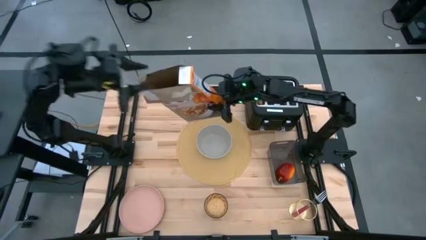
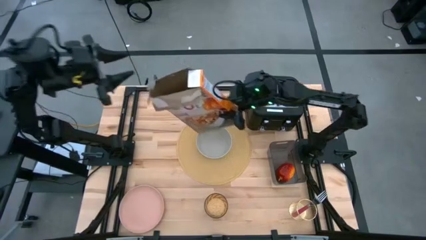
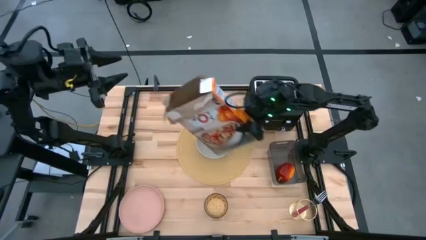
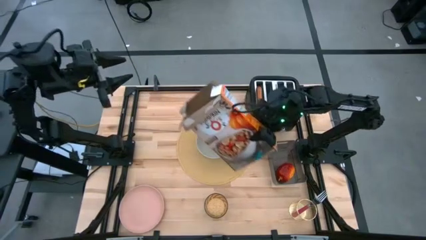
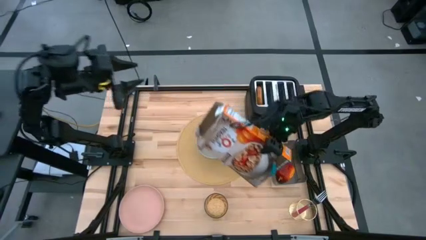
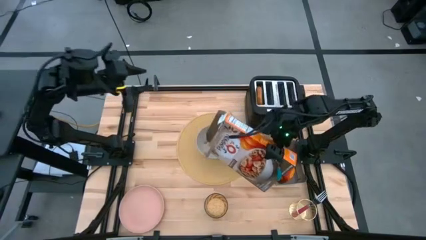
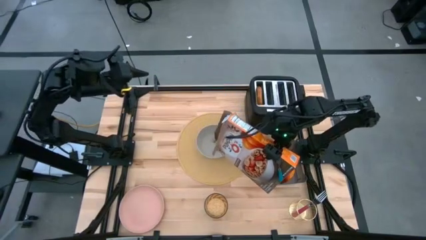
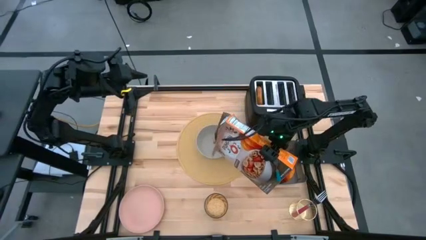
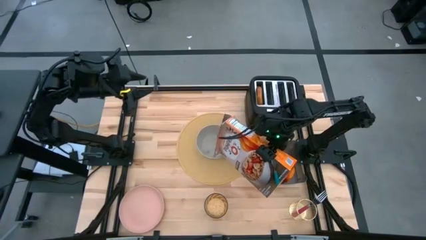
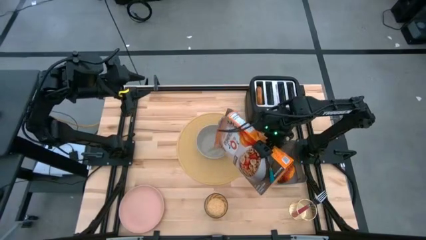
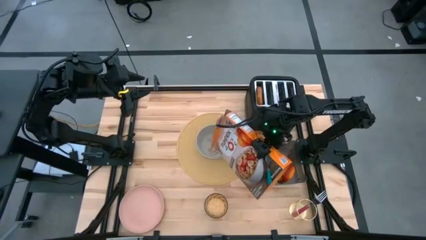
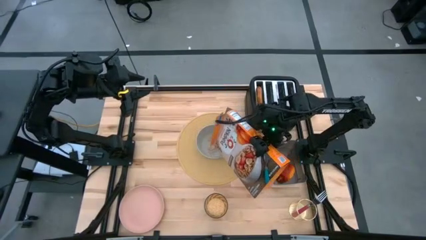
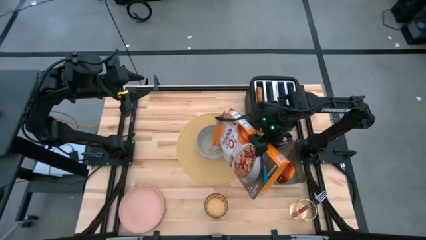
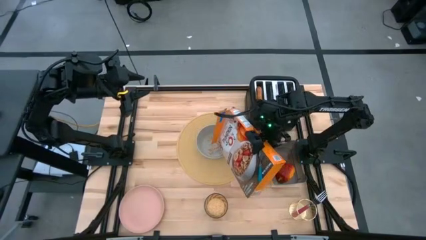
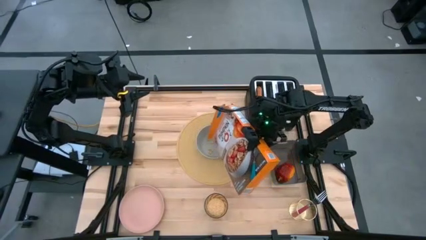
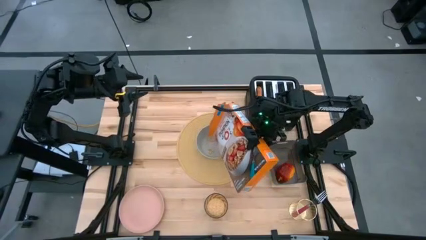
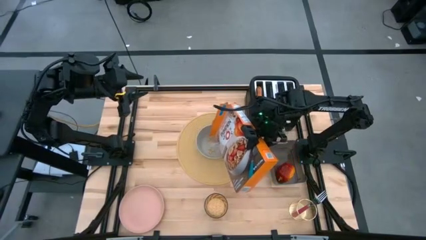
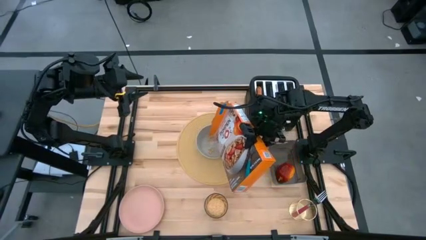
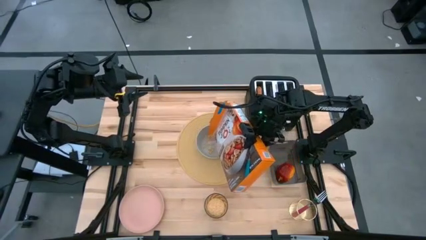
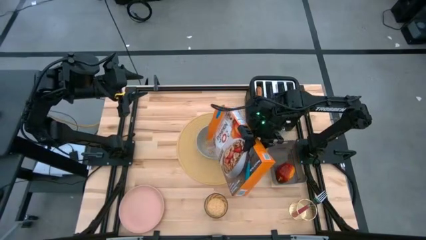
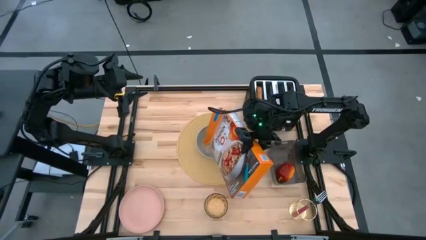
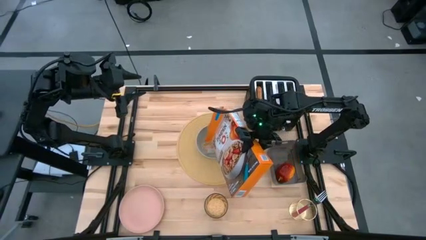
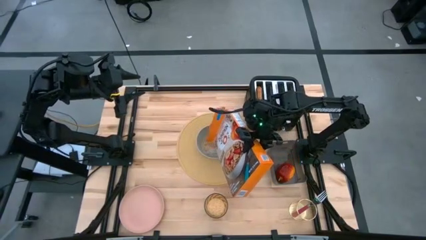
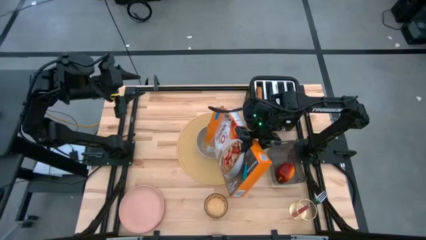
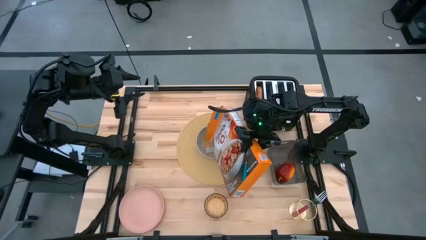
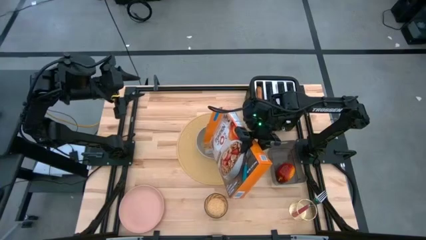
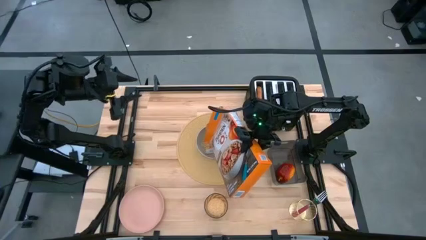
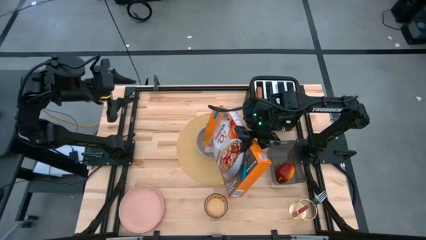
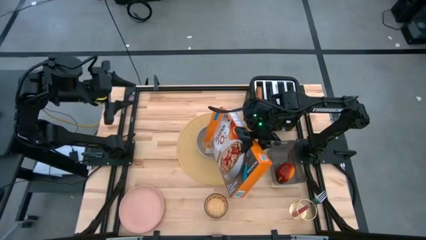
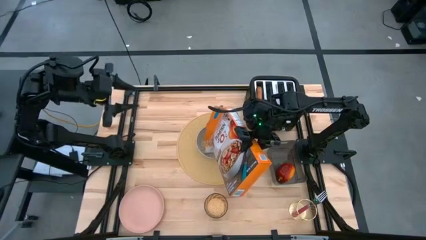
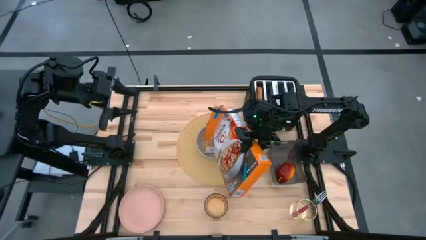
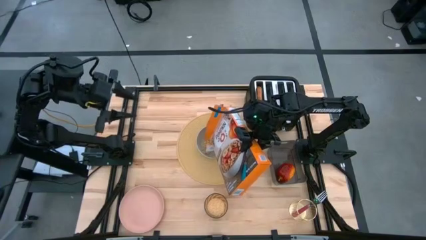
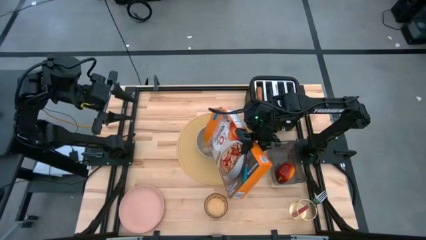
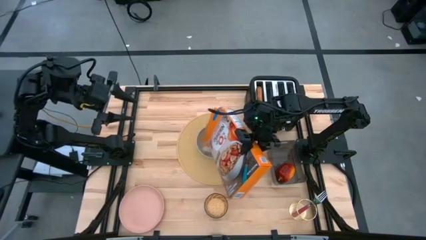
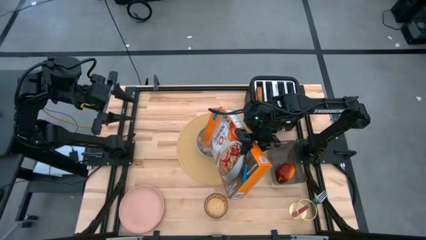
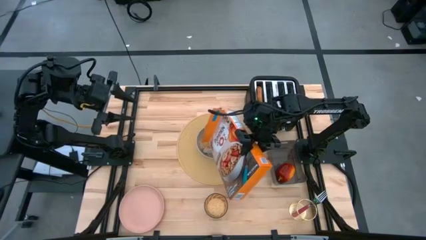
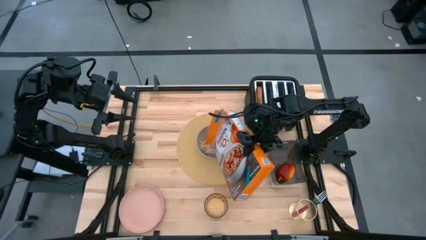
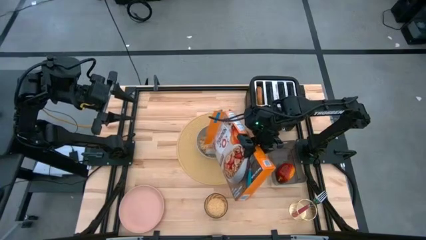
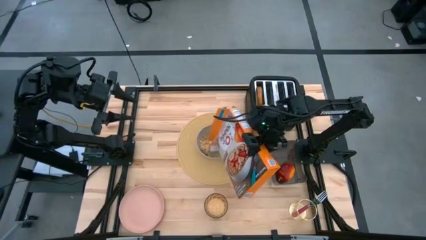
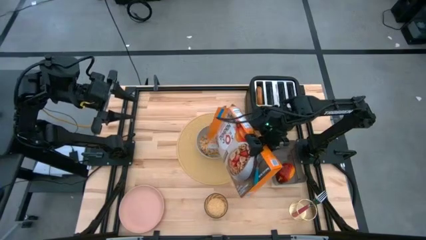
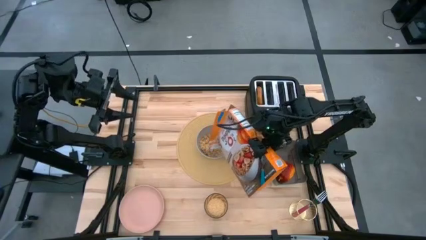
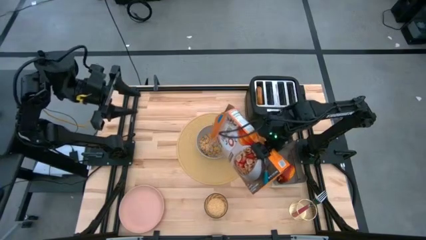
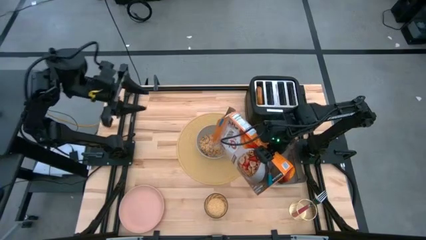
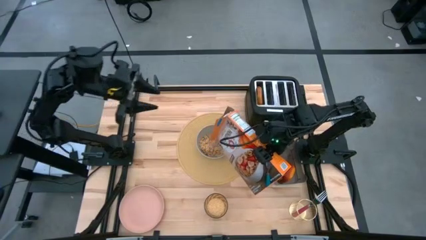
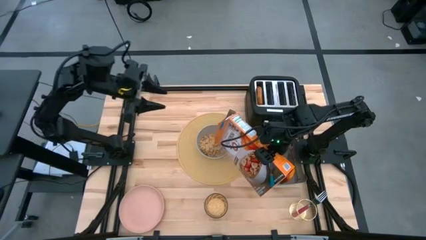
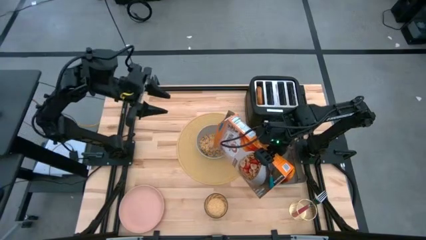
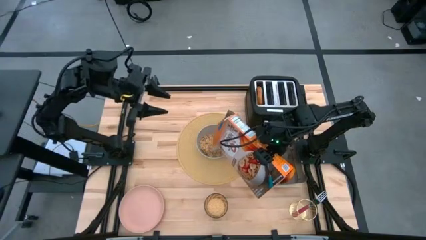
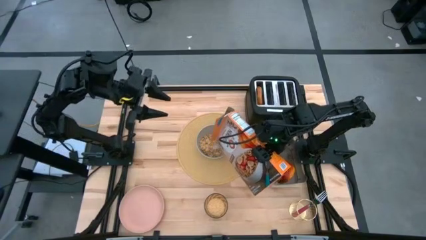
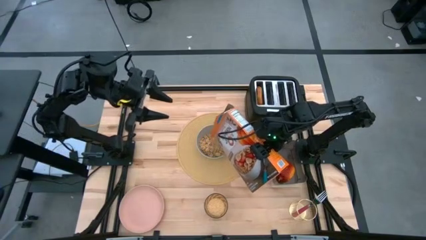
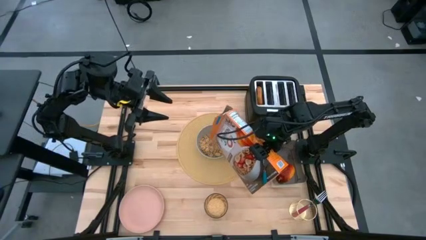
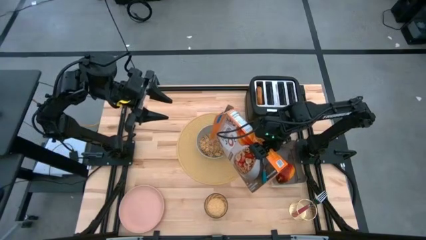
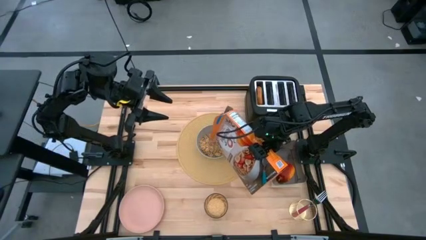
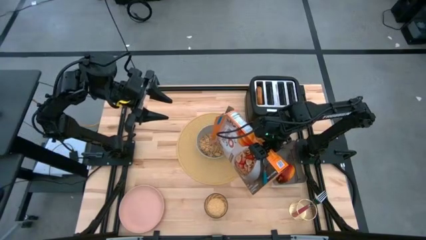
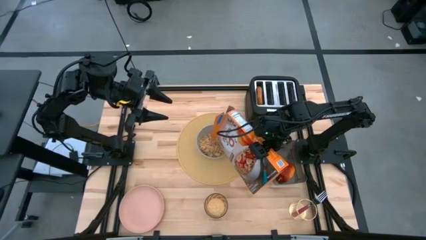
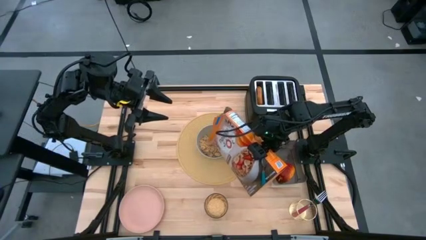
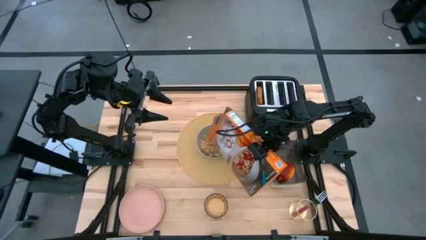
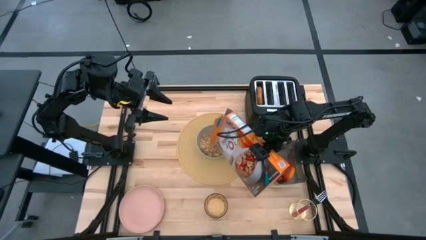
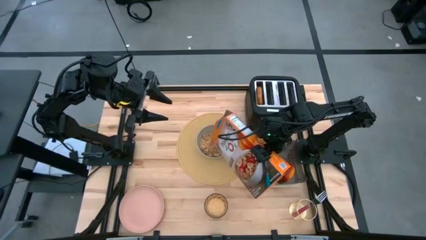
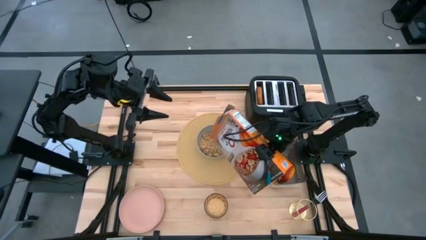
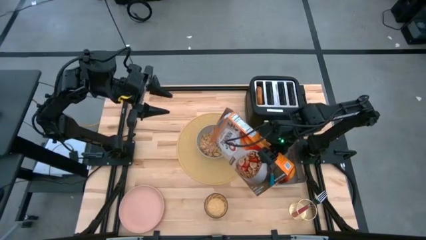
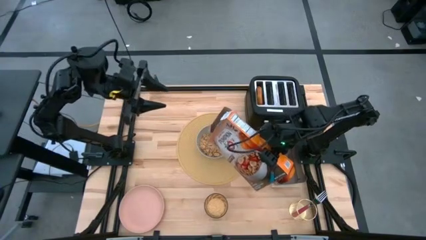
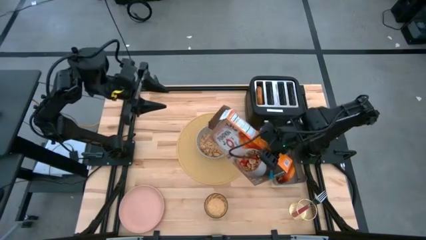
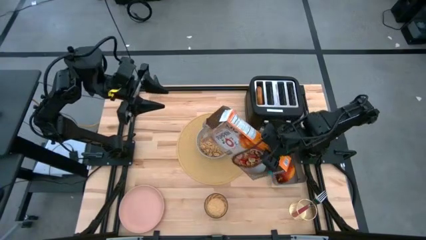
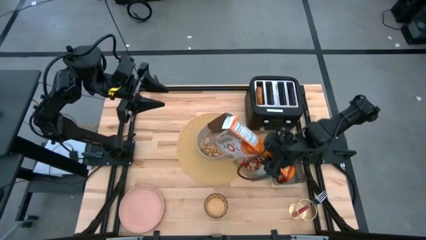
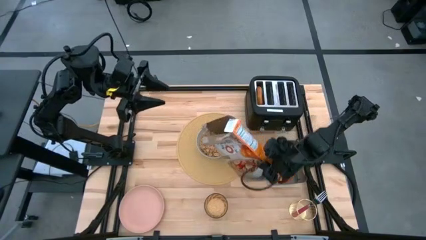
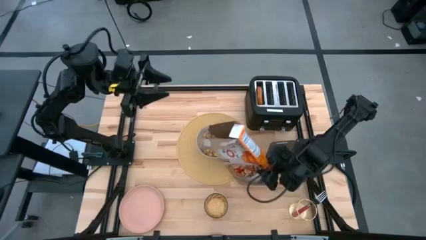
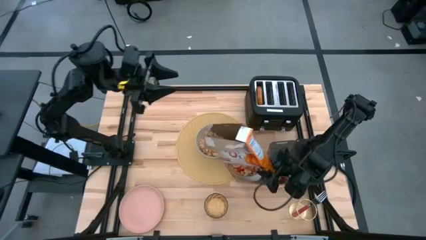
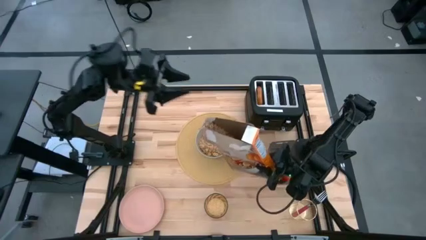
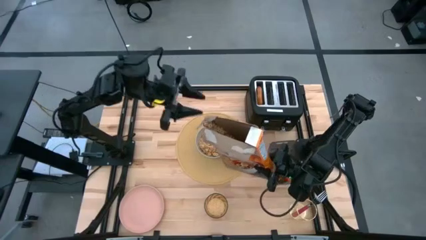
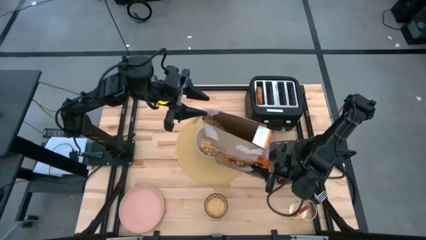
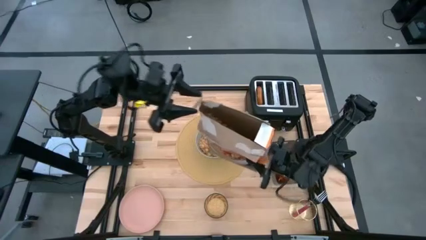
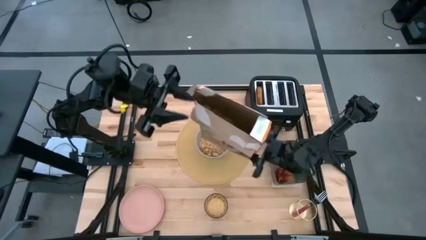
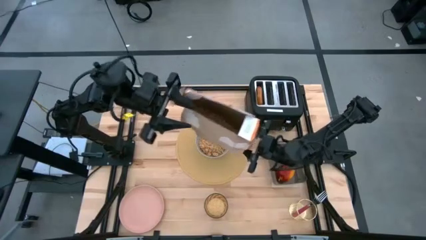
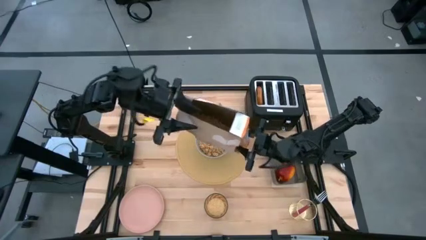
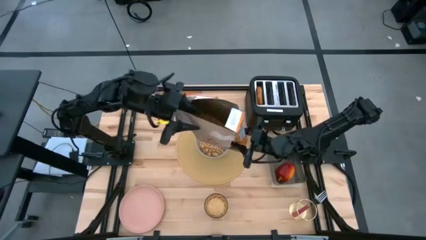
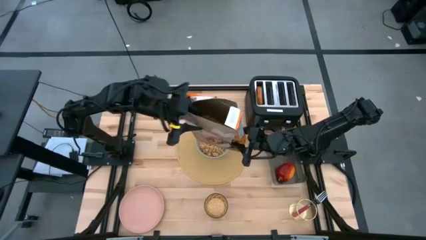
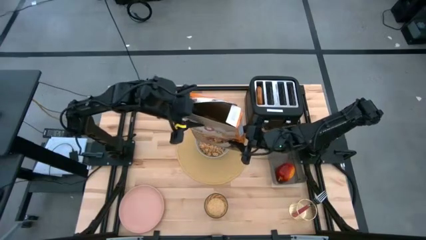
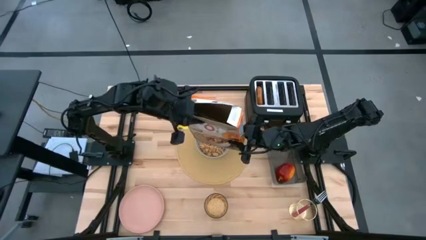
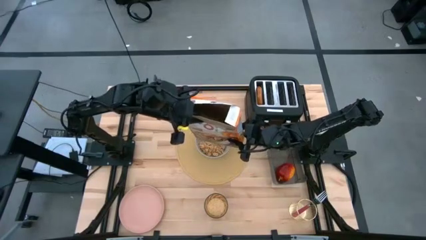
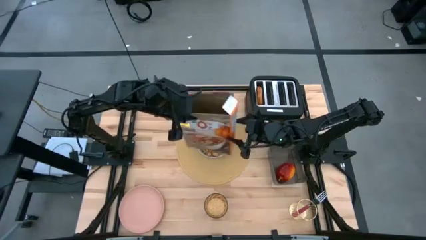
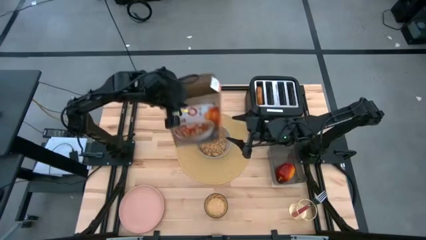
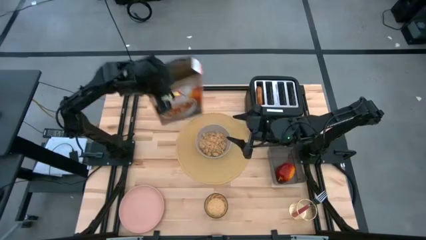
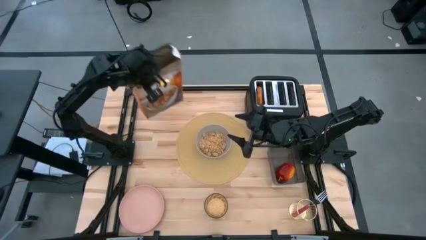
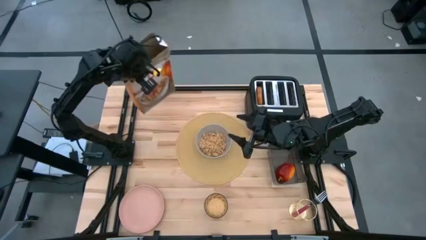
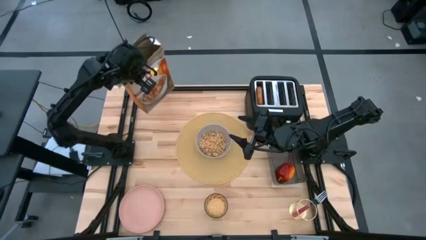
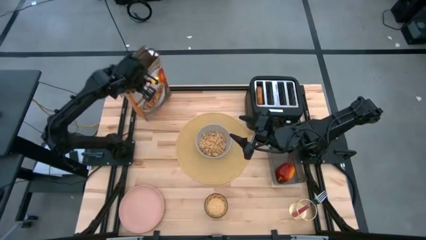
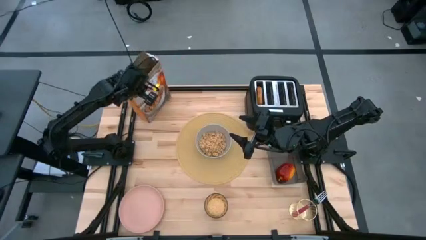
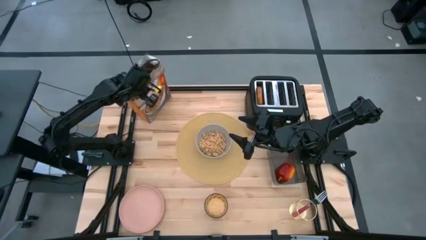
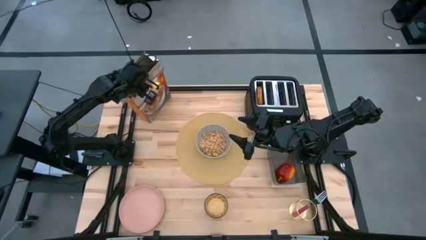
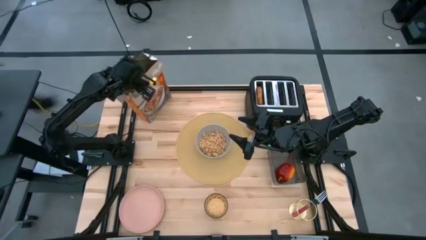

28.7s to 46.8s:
Task: Arrange a breakfast setting
Pour the cereal from the brown cereal box into the gray bowl
